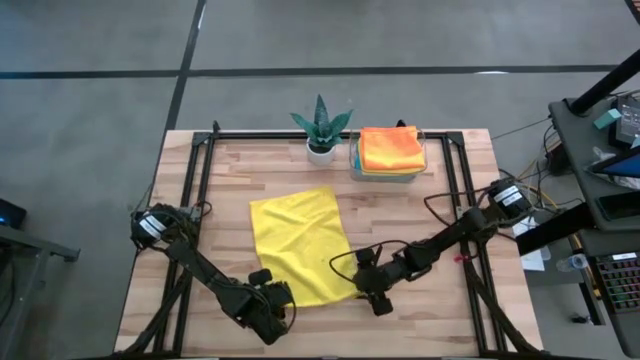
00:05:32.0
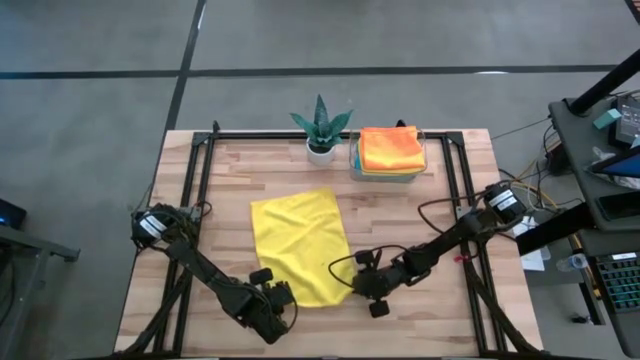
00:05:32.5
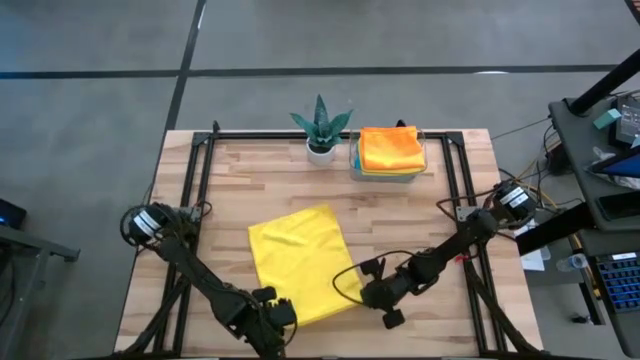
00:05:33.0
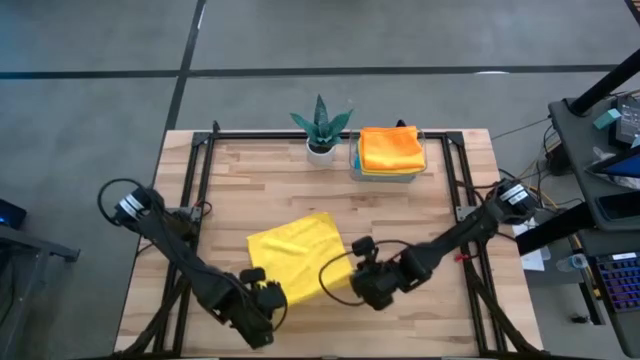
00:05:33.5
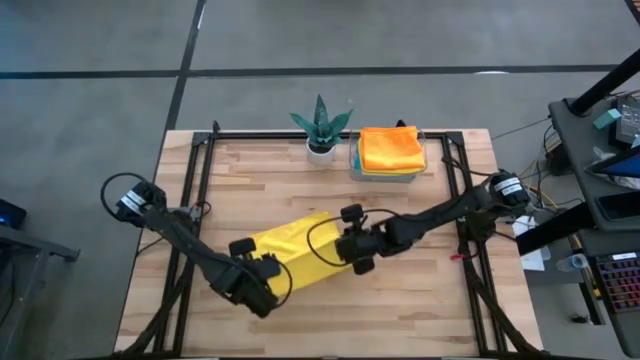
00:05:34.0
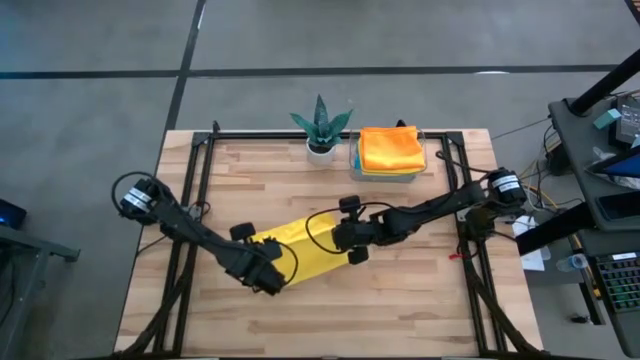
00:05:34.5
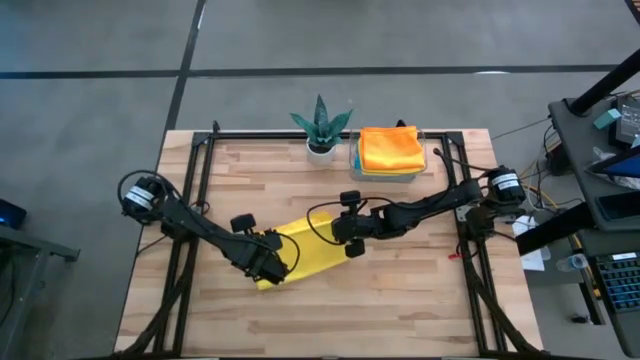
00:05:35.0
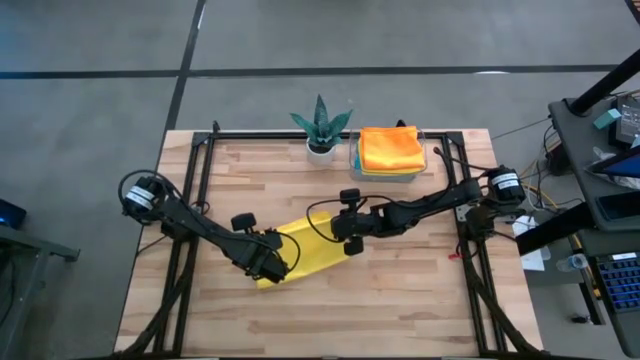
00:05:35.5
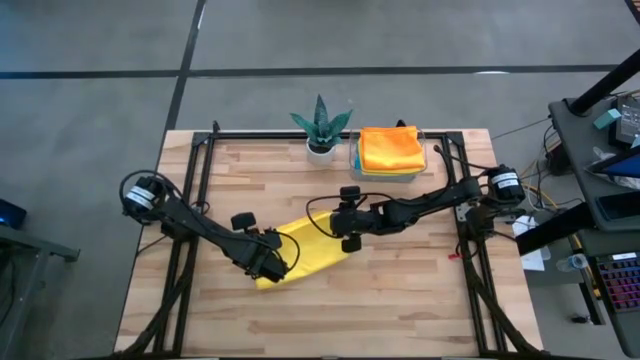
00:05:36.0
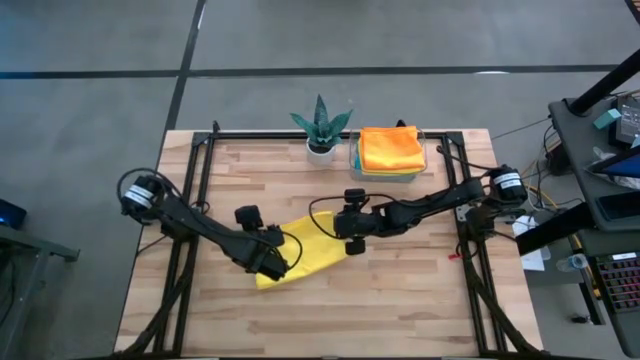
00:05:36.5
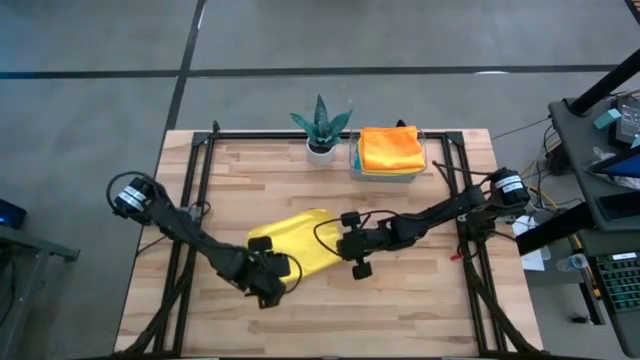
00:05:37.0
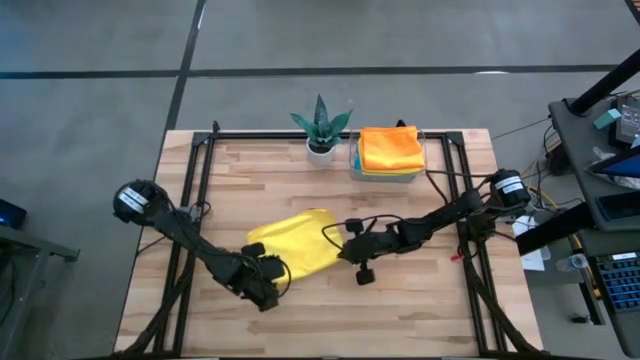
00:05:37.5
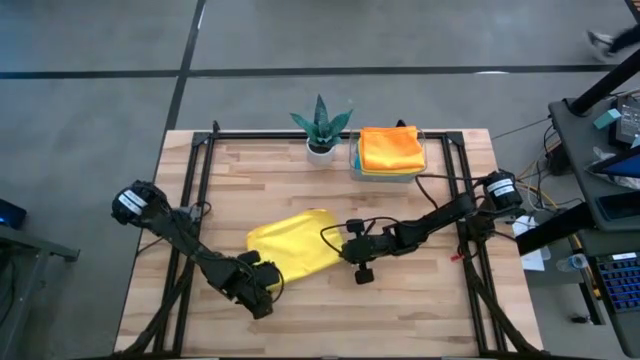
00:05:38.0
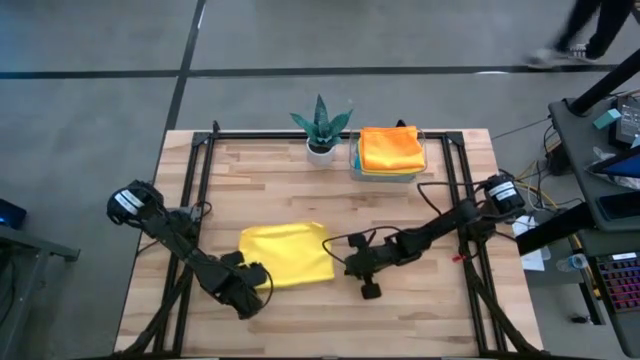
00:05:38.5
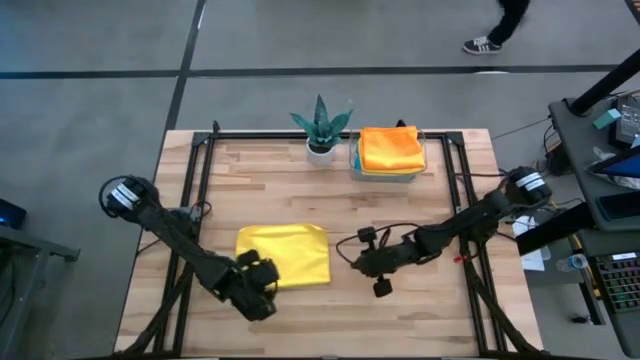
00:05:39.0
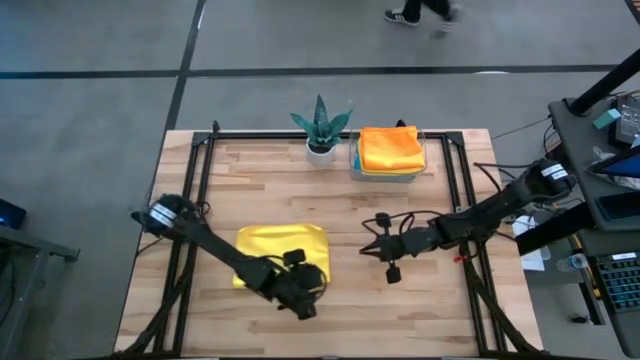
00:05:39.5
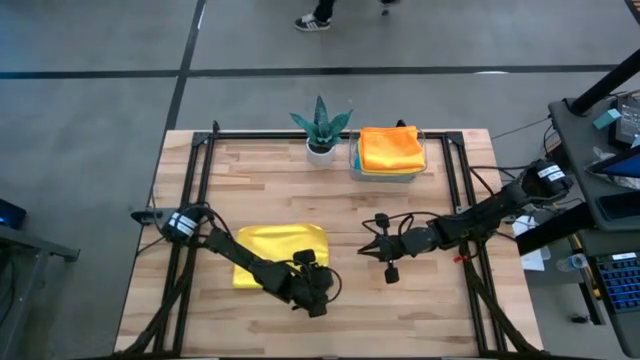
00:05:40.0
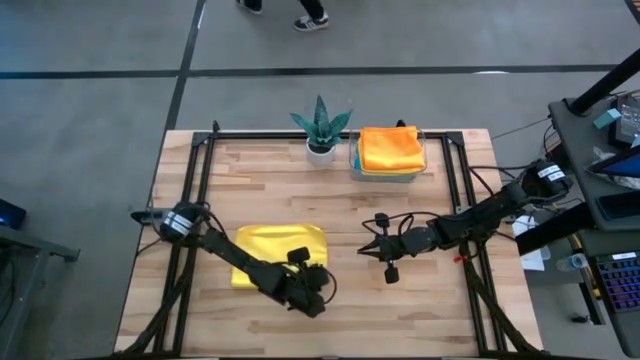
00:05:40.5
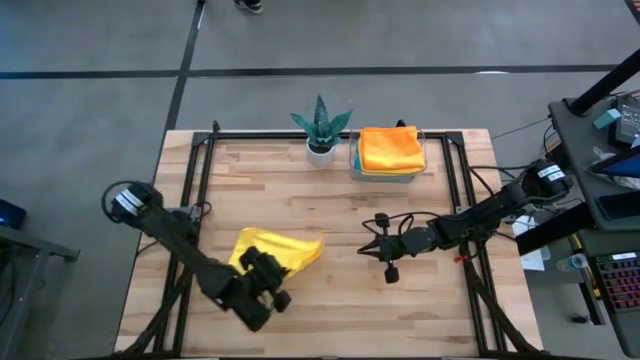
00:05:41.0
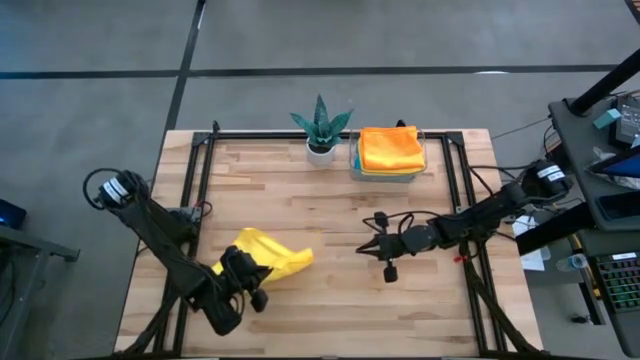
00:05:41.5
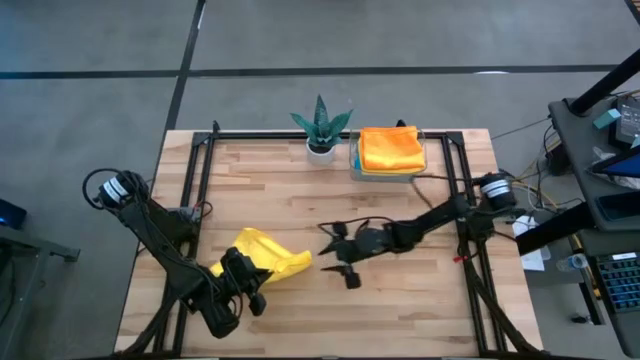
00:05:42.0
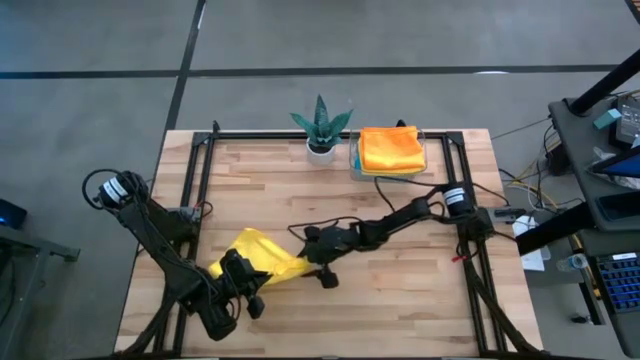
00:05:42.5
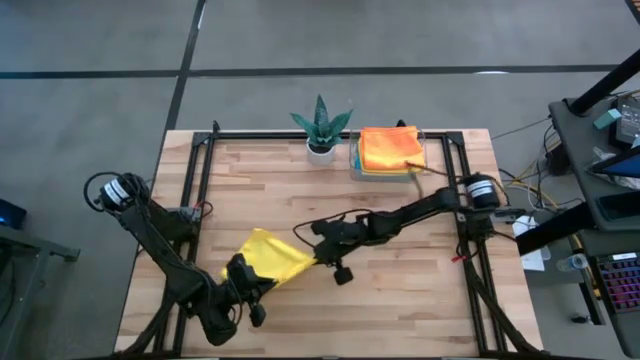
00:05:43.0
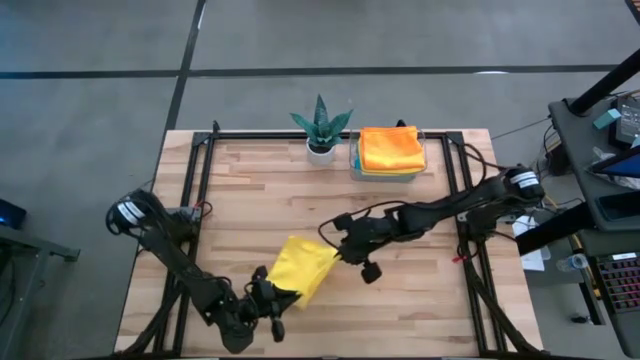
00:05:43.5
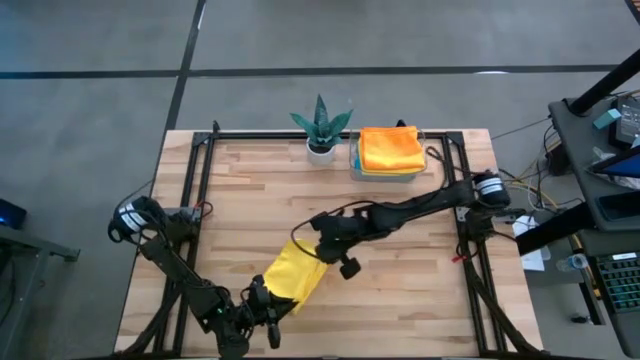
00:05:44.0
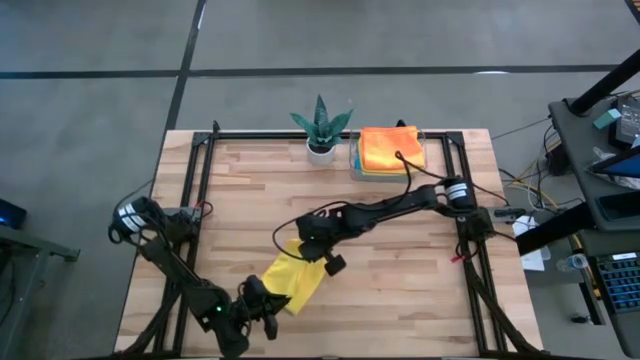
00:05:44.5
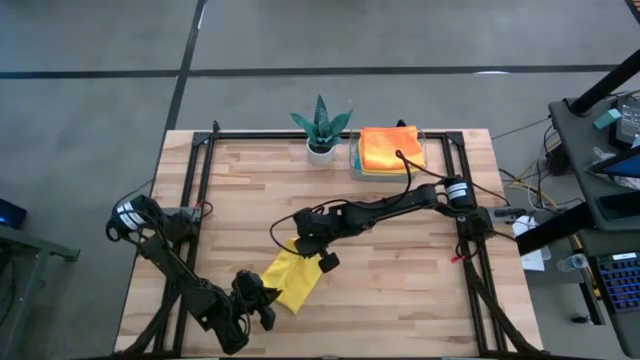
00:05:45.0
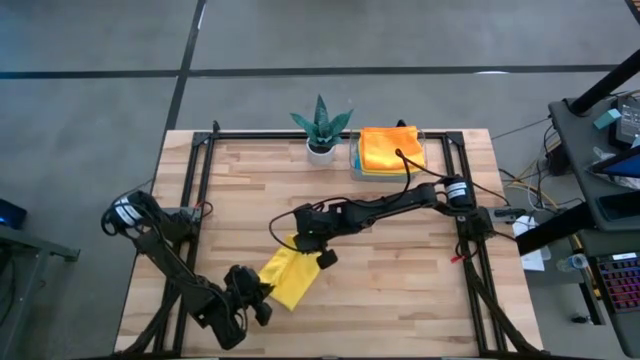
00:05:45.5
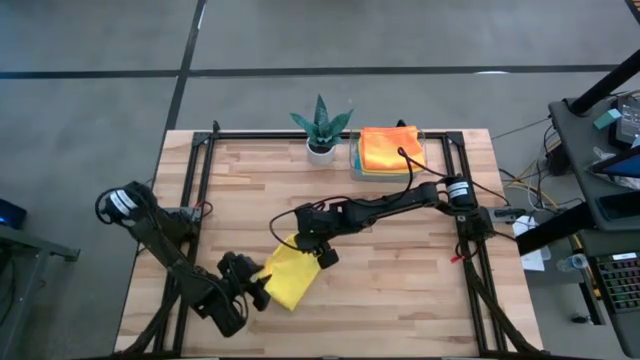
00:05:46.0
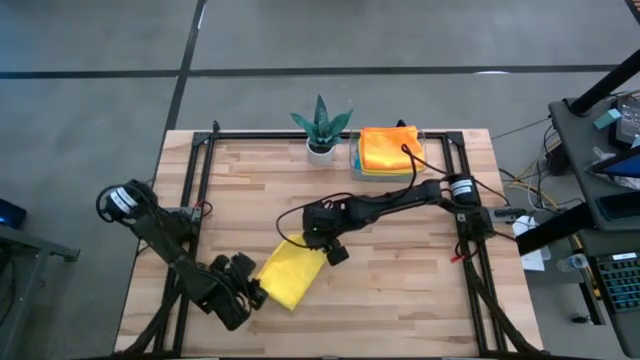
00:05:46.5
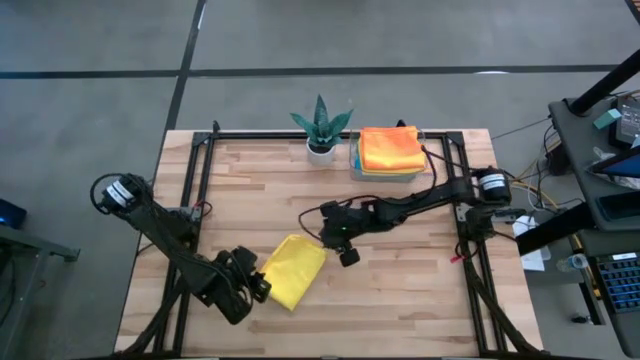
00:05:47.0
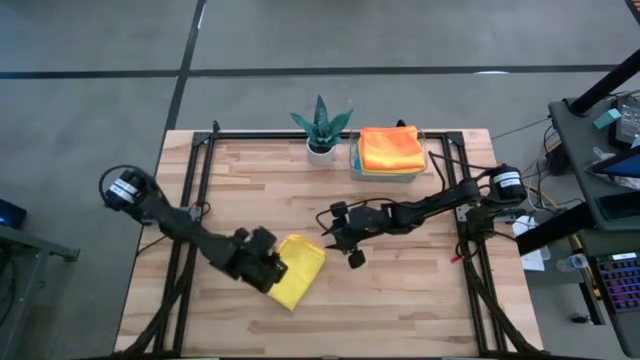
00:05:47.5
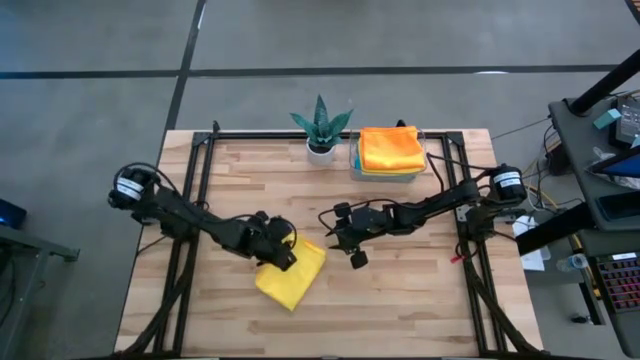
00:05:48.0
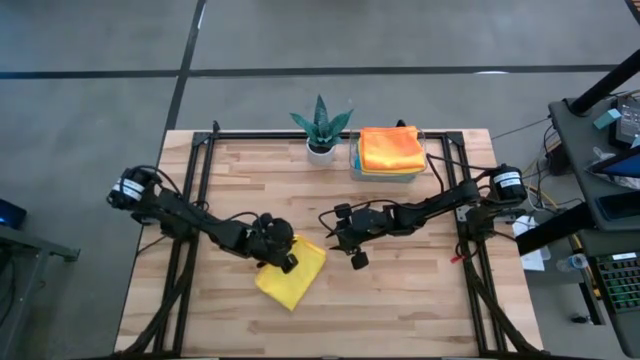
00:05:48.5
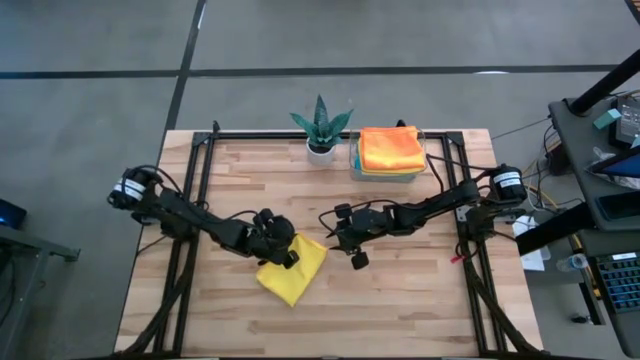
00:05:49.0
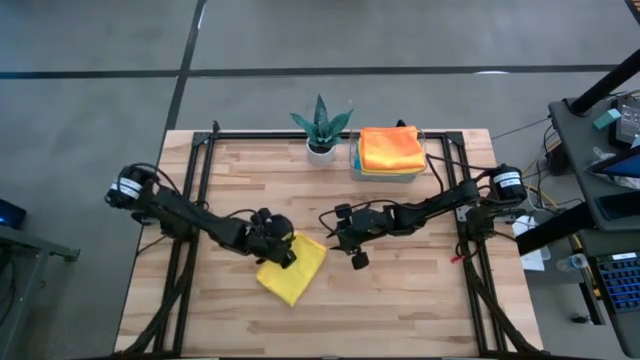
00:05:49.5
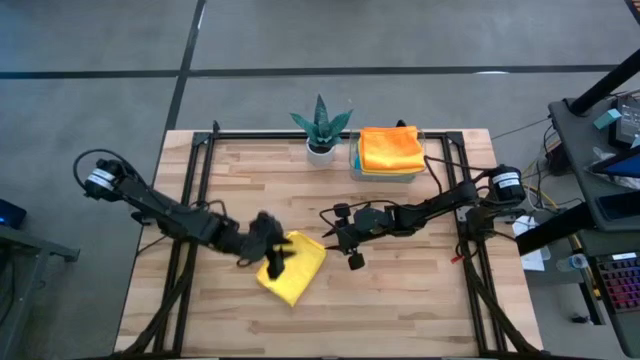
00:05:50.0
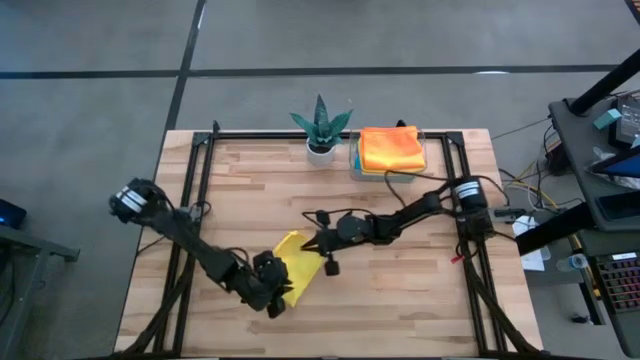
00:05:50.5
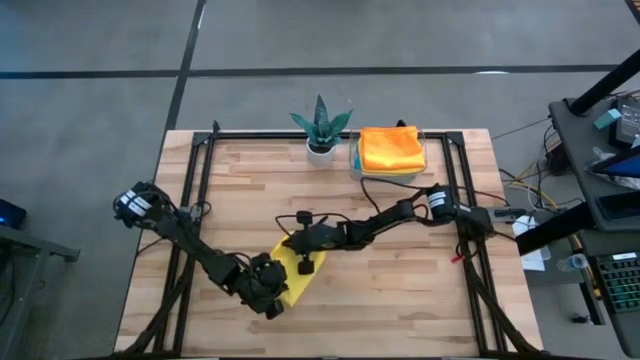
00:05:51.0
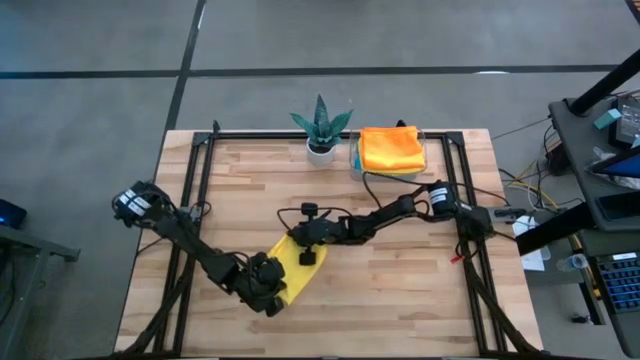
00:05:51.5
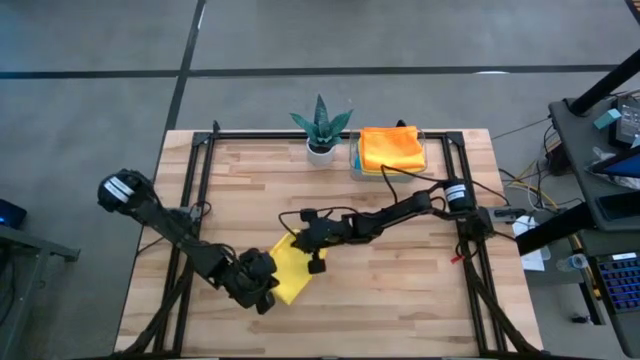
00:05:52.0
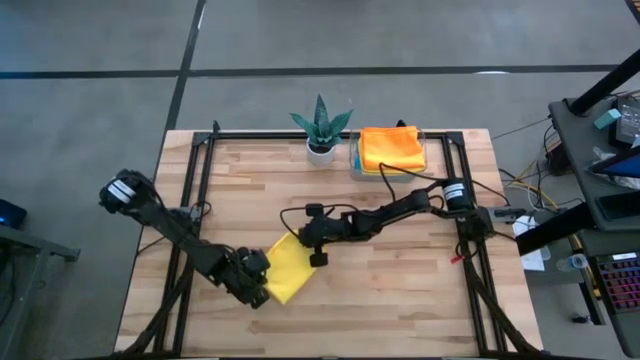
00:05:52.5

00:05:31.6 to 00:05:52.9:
Task: Fold microfiber towels
Fold the yellow microfiber towel
